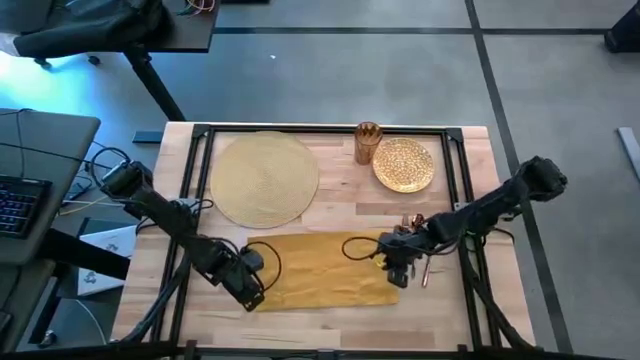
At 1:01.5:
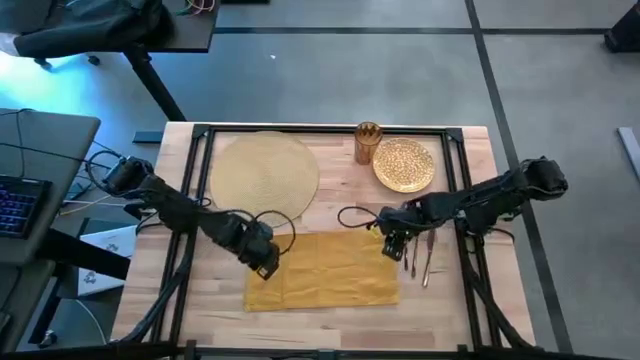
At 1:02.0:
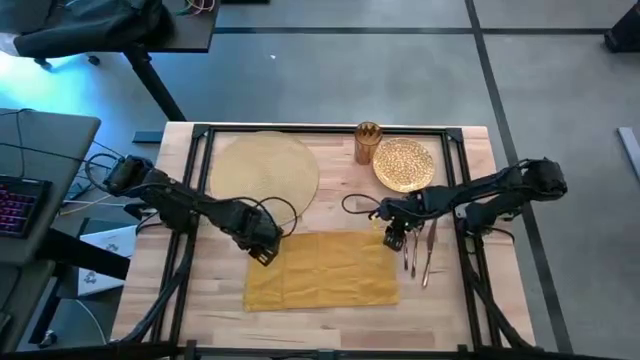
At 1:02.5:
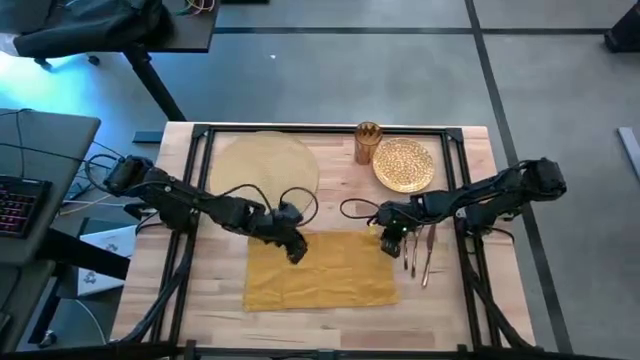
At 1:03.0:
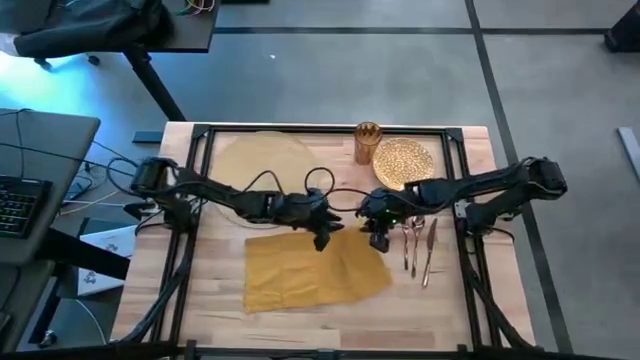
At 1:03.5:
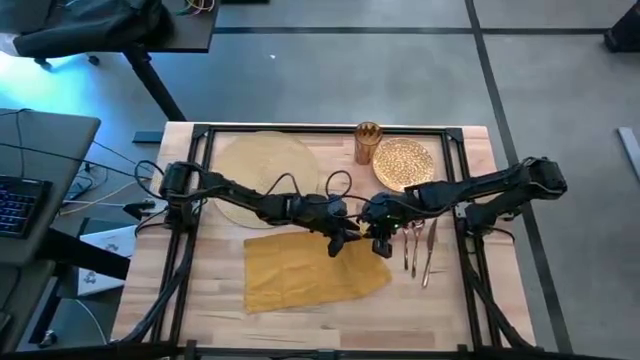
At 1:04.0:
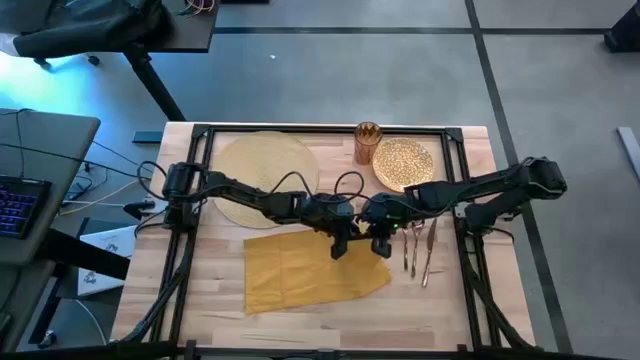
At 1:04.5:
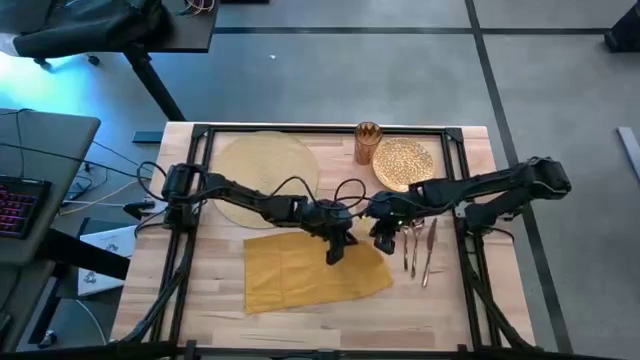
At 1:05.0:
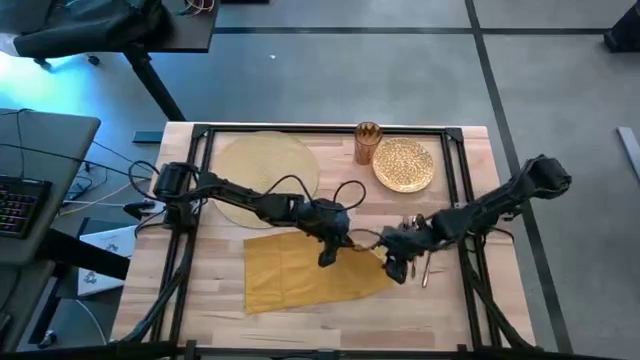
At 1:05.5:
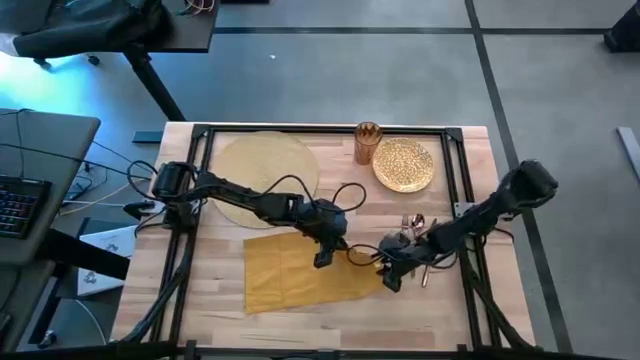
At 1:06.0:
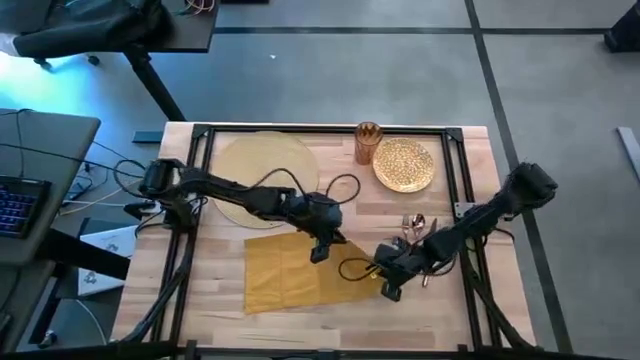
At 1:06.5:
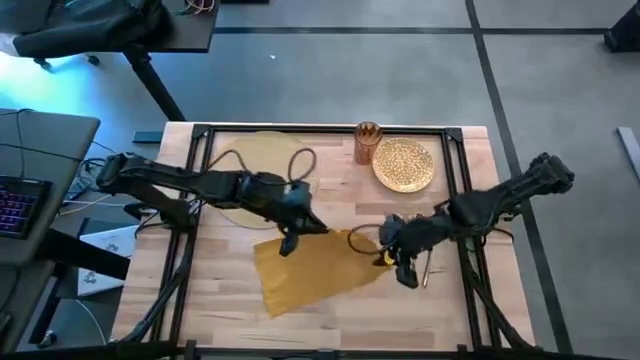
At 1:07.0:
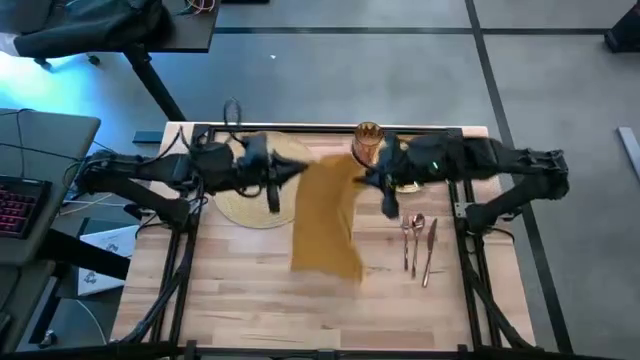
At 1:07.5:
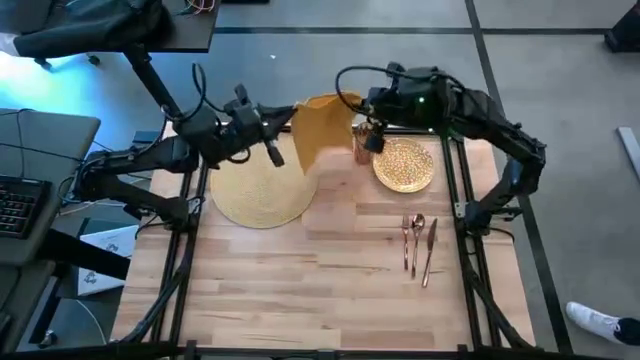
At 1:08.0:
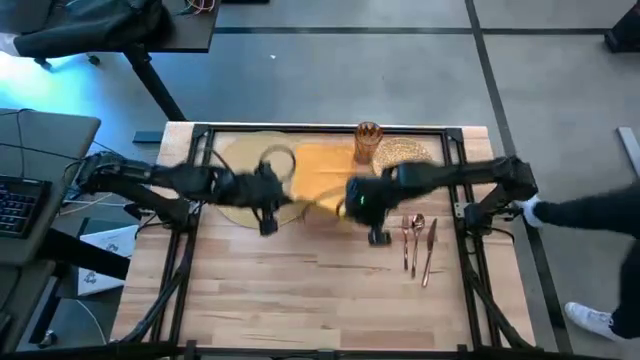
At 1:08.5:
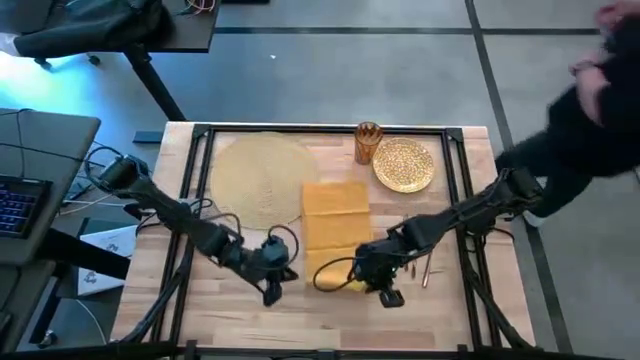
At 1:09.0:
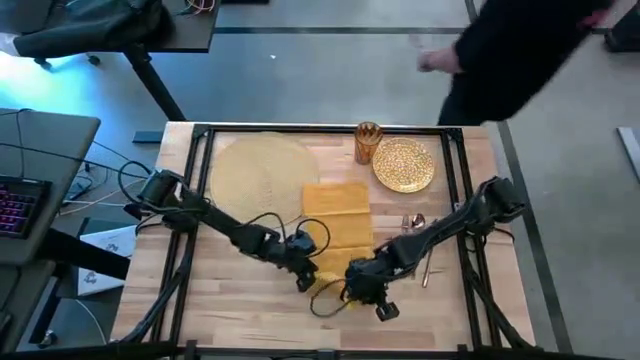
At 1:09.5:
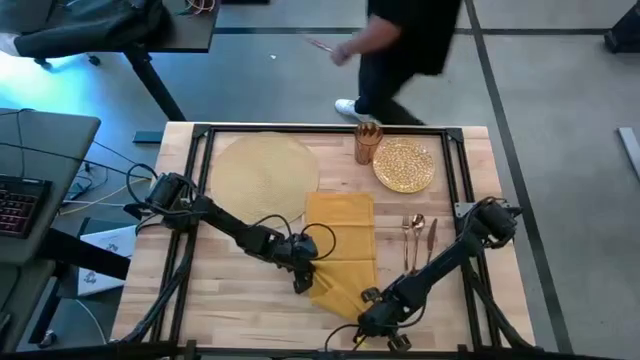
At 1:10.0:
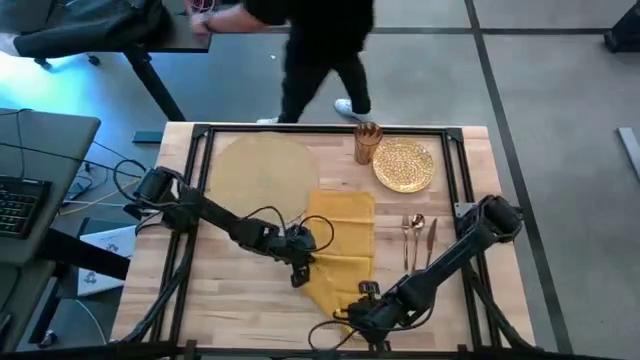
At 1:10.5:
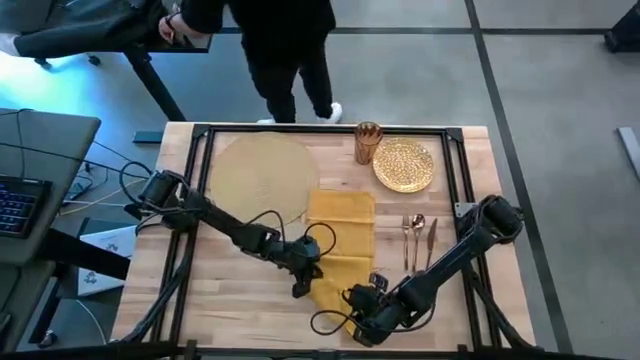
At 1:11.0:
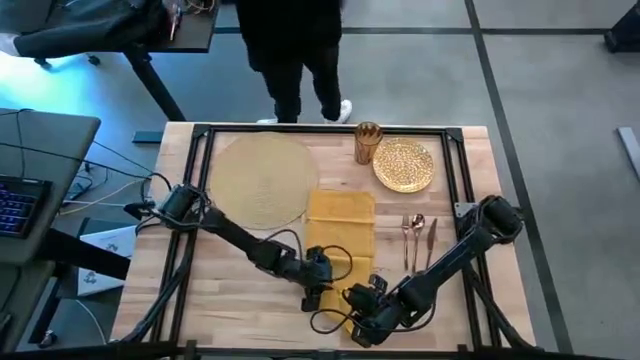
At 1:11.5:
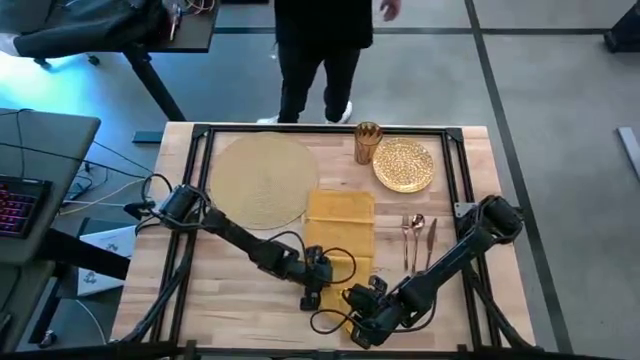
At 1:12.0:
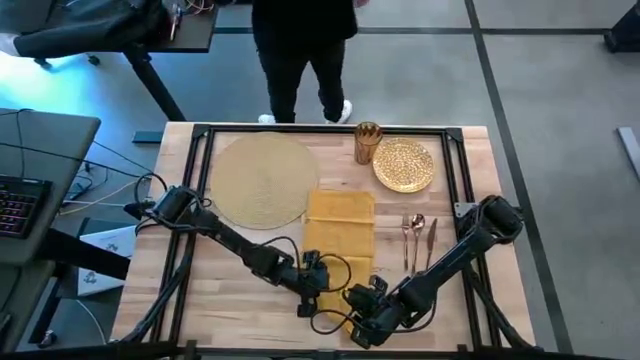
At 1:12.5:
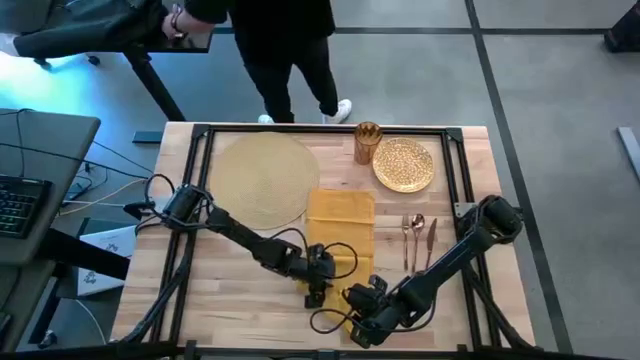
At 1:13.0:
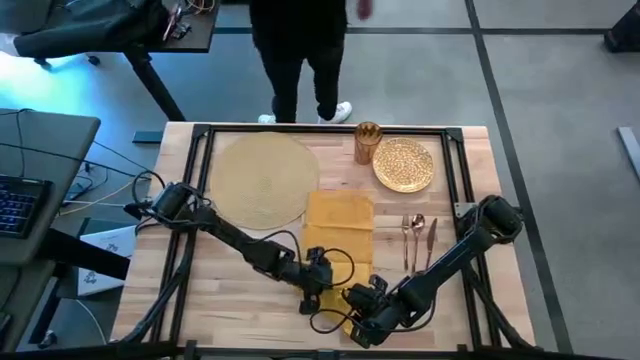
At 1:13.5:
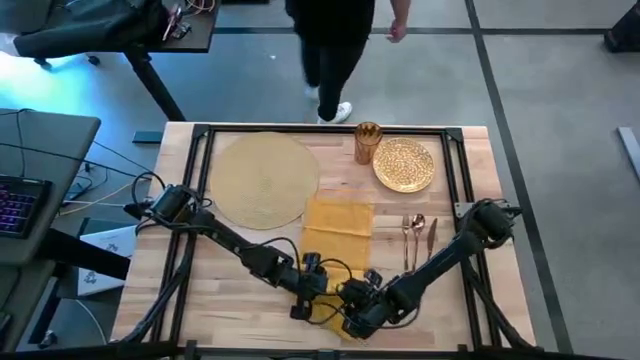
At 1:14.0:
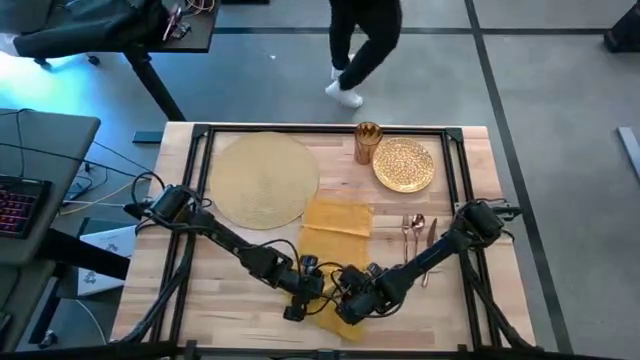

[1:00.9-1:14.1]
Task: Set table place
Fold the yellow table napkin

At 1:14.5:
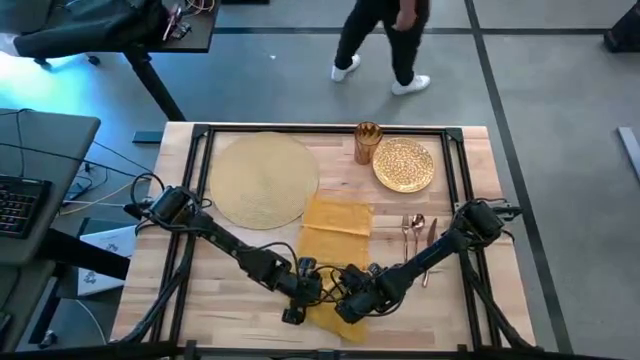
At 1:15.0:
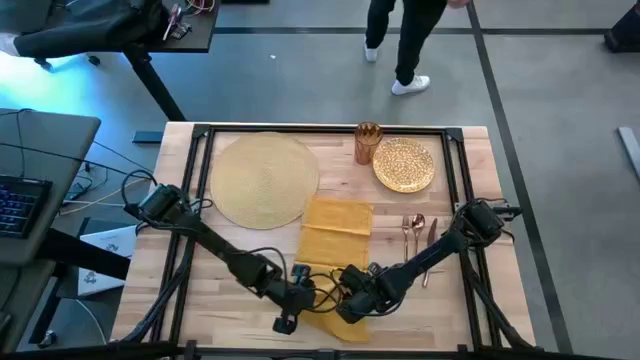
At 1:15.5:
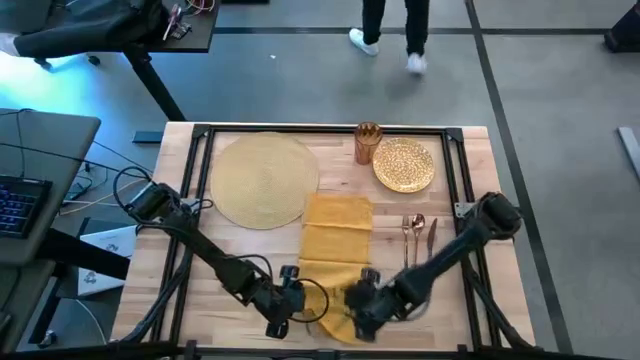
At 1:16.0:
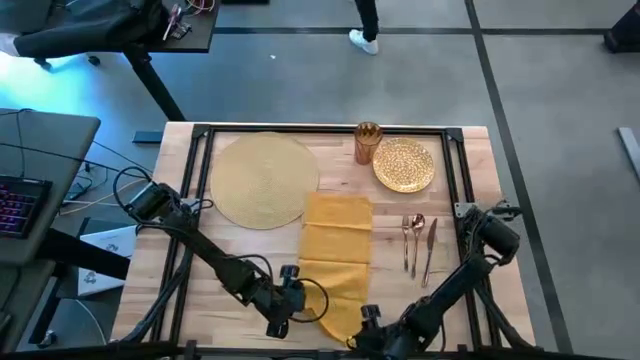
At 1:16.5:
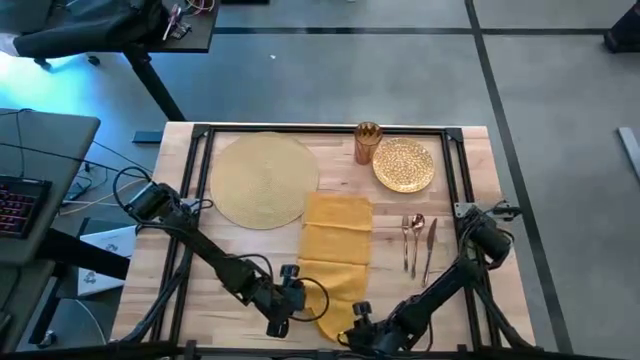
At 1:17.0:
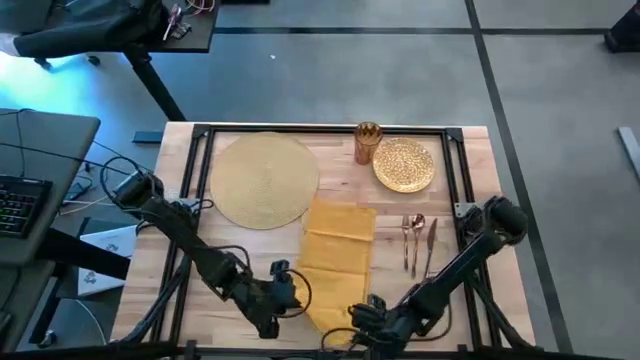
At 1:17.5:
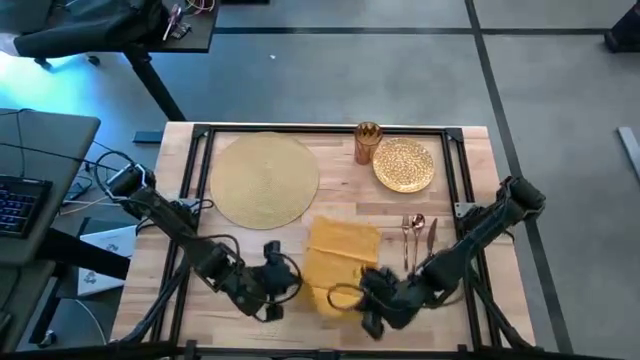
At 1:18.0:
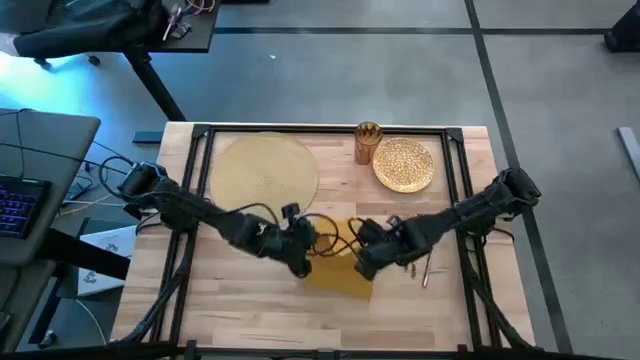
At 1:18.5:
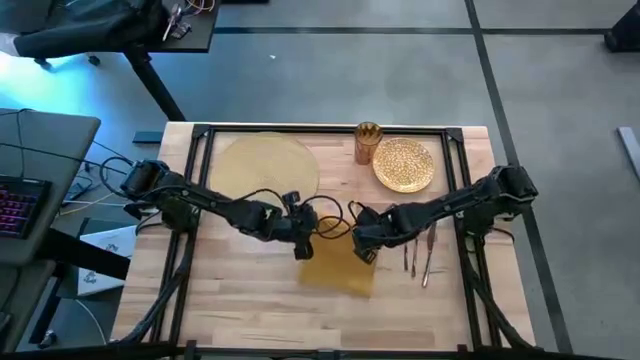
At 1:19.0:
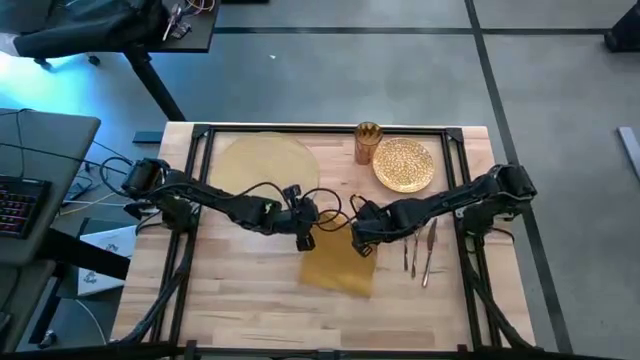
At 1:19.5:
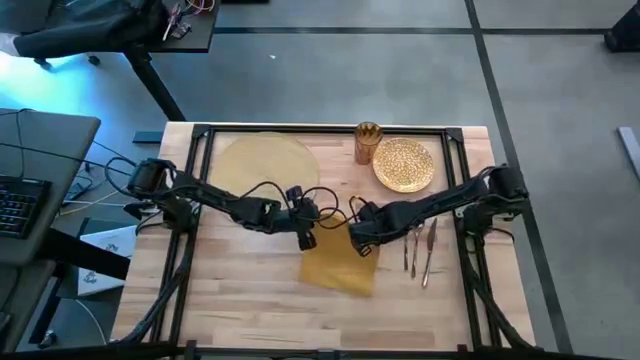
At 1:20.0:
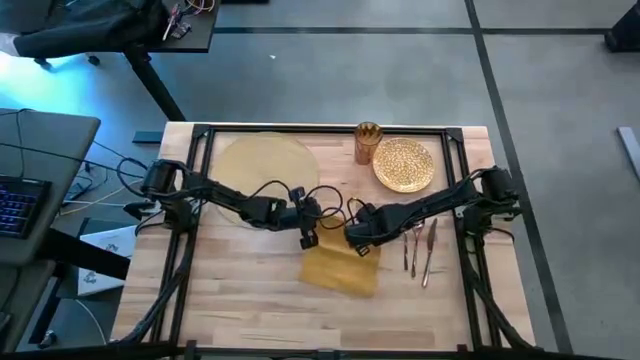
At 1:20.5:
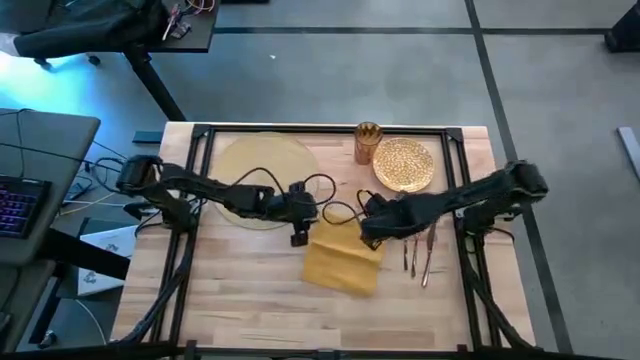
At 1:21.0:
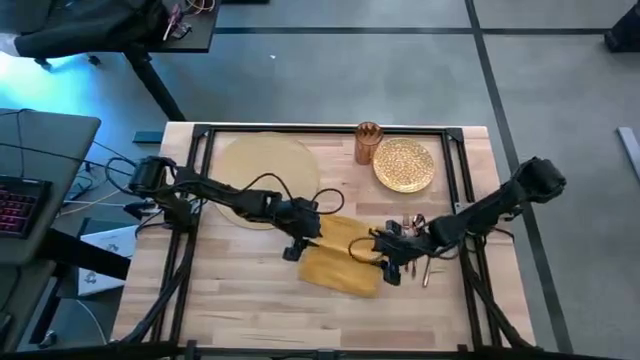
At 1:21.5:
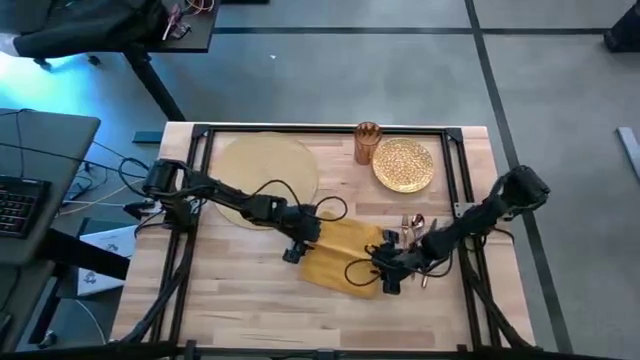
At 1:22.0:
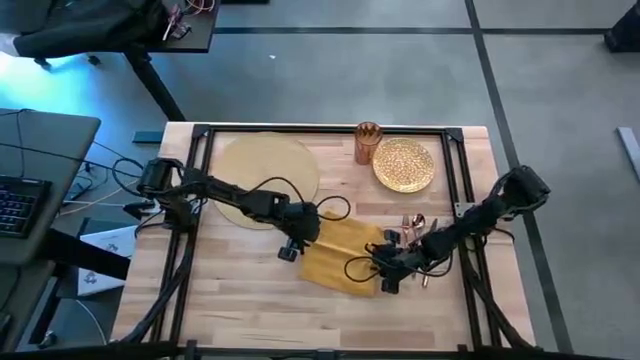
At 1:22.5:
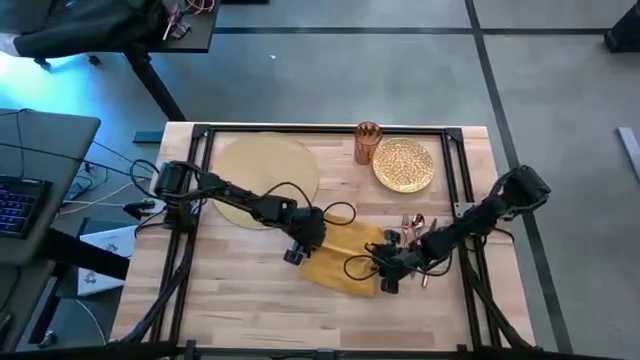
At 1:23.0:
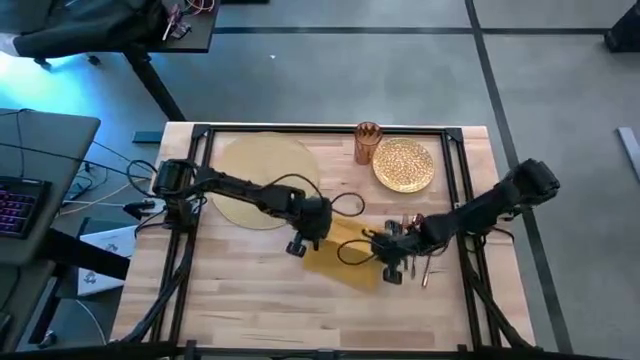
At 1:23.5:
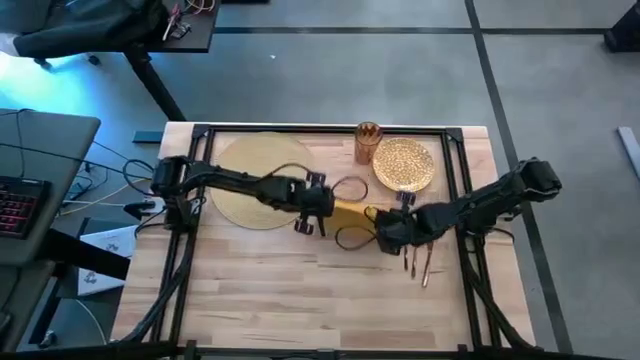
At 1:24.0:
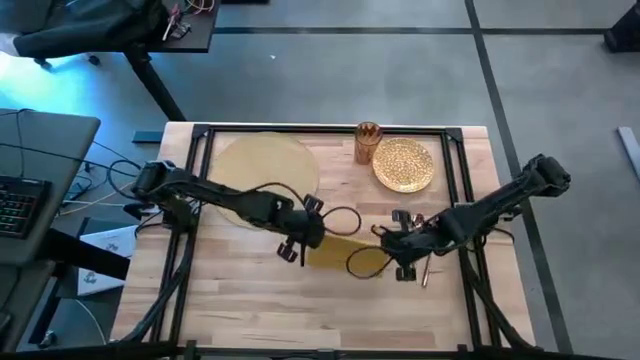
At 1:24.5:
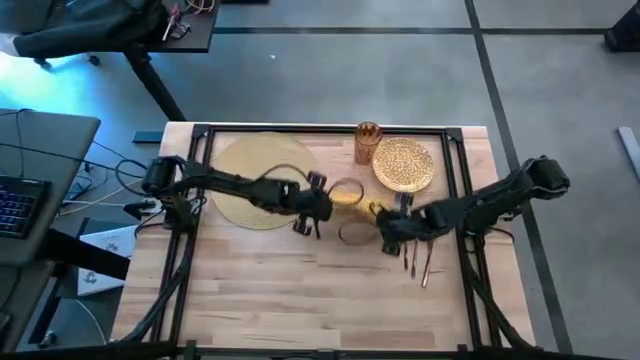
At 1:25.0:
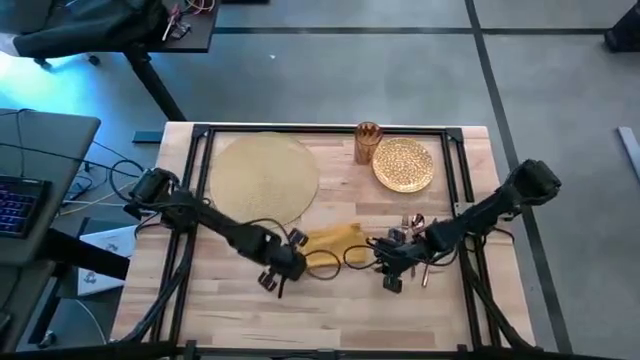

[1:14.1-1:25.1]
Fold the yellow table napkin
